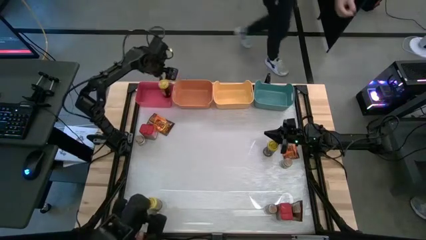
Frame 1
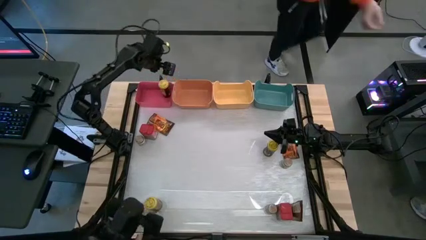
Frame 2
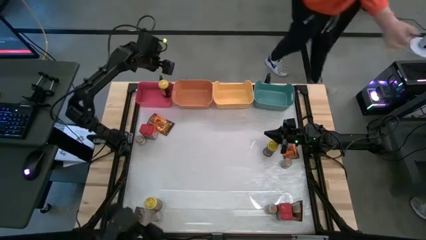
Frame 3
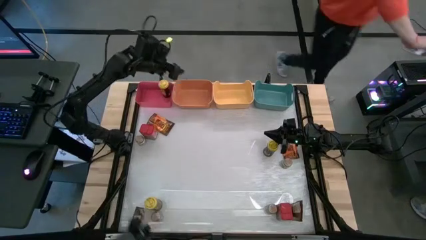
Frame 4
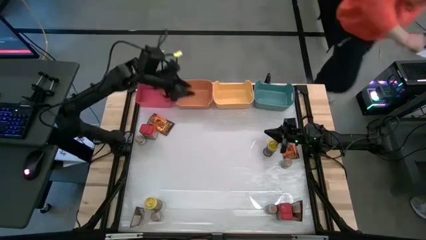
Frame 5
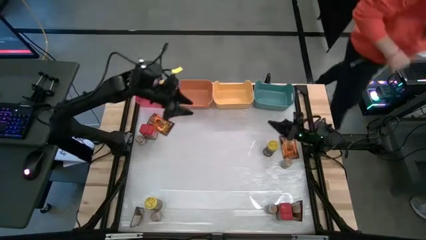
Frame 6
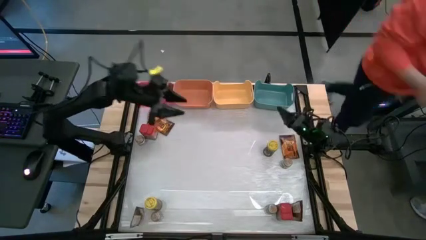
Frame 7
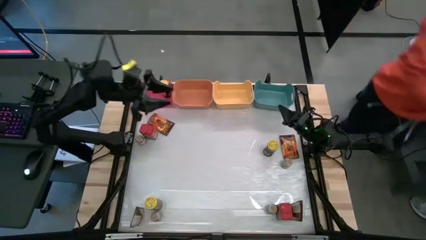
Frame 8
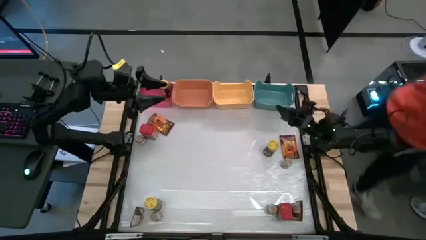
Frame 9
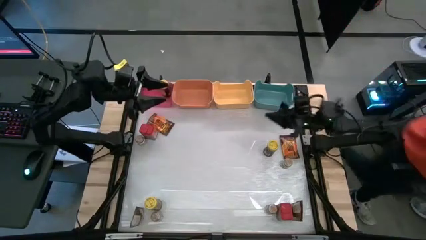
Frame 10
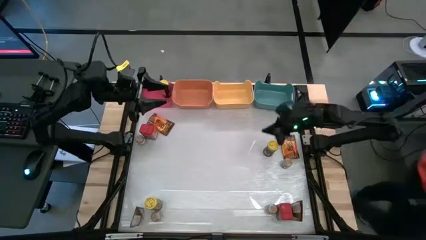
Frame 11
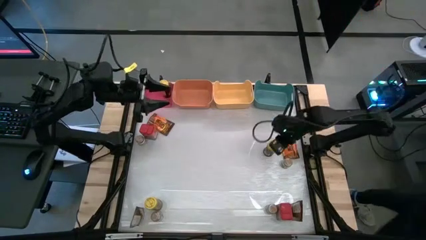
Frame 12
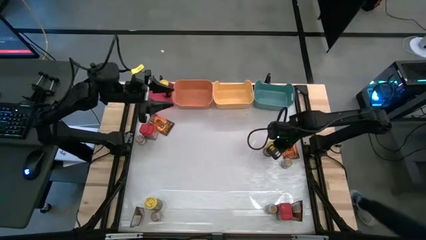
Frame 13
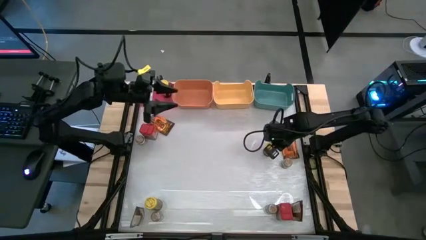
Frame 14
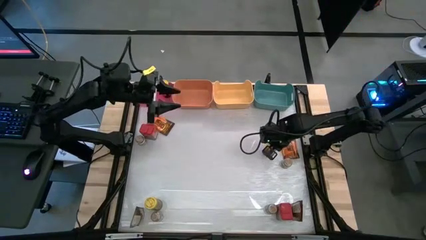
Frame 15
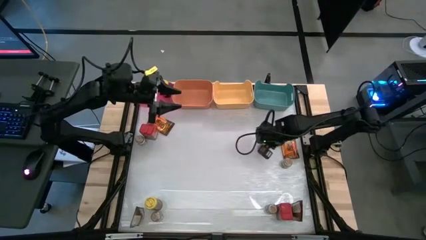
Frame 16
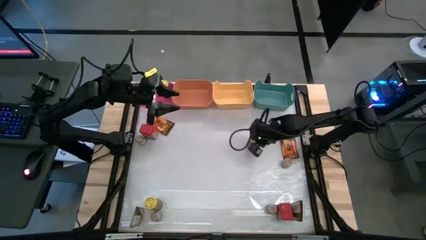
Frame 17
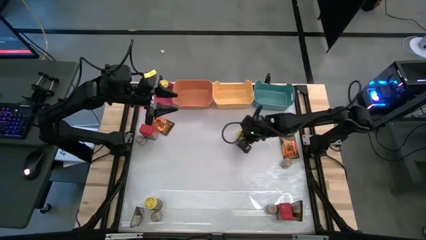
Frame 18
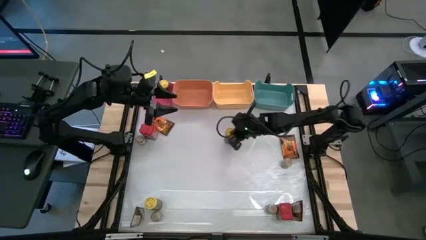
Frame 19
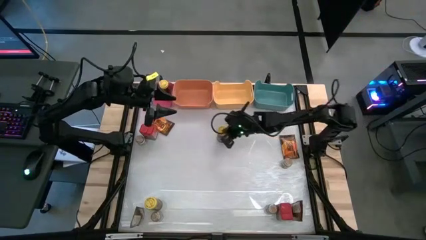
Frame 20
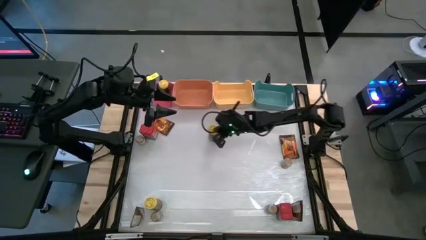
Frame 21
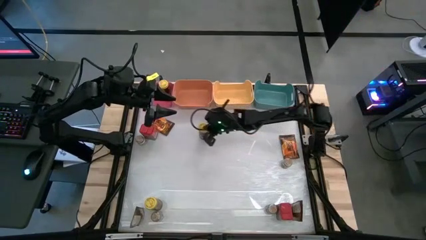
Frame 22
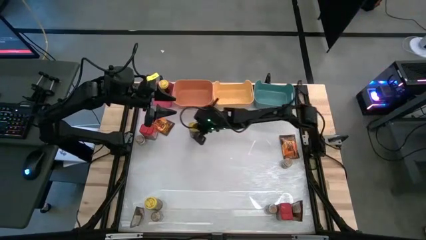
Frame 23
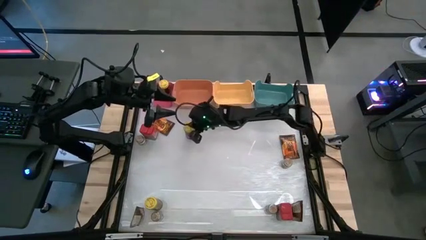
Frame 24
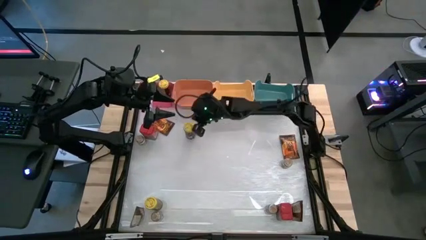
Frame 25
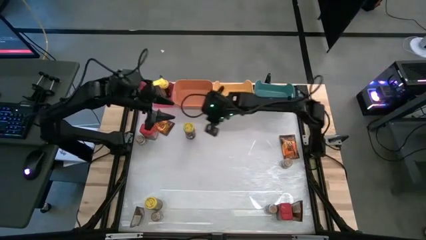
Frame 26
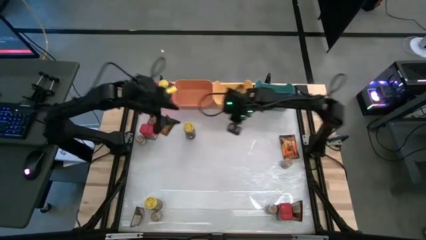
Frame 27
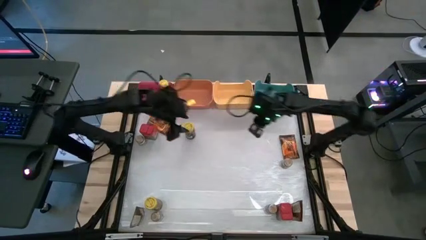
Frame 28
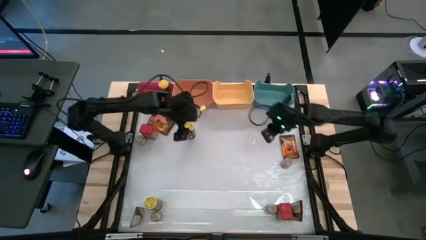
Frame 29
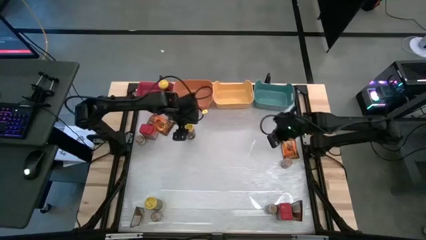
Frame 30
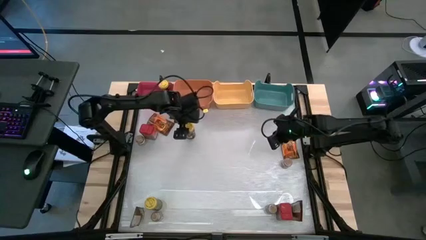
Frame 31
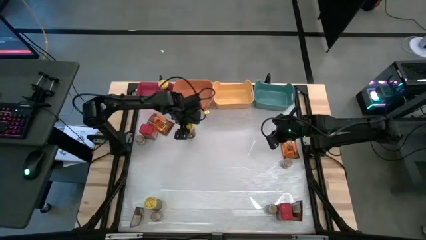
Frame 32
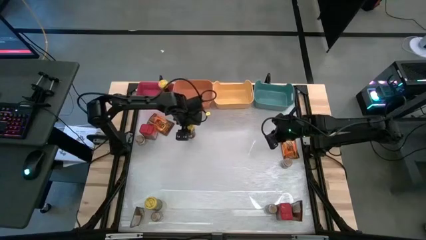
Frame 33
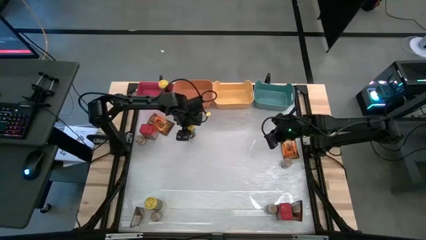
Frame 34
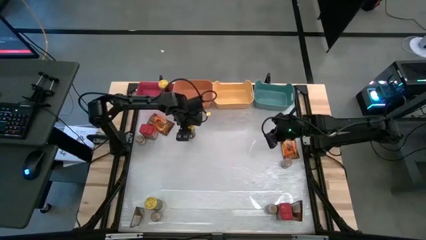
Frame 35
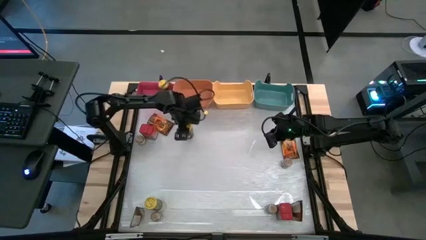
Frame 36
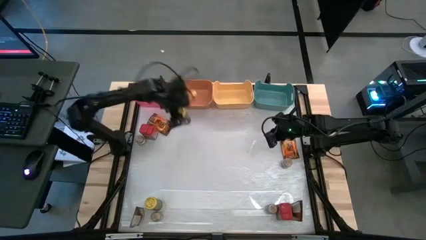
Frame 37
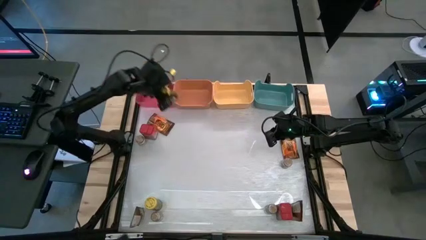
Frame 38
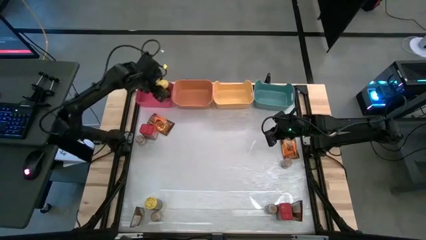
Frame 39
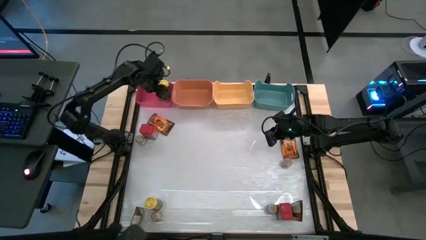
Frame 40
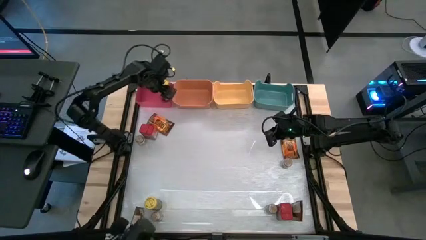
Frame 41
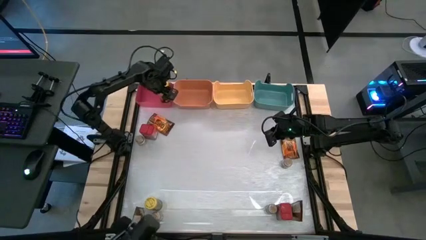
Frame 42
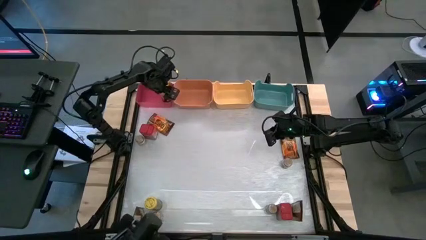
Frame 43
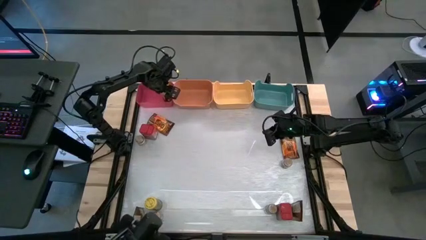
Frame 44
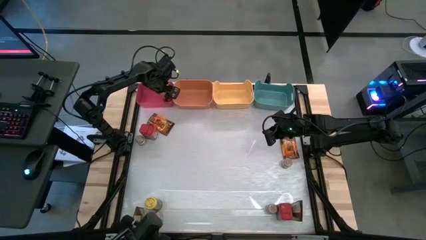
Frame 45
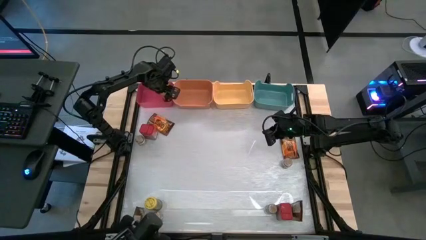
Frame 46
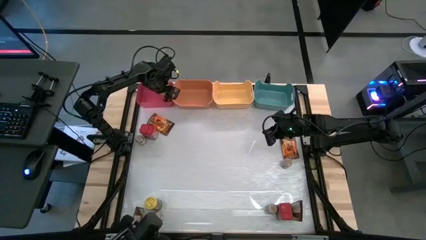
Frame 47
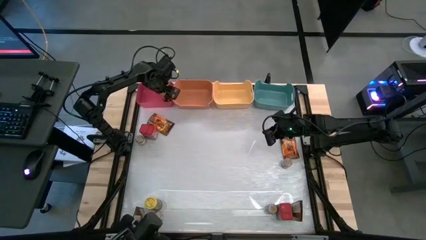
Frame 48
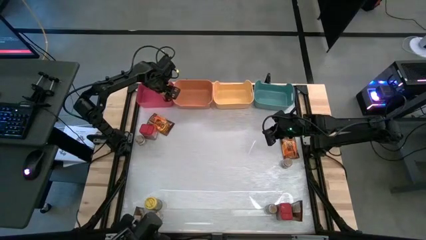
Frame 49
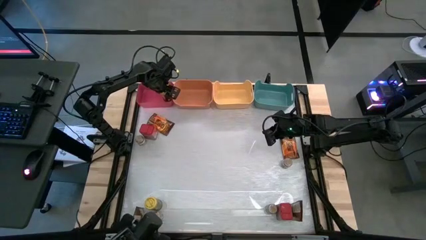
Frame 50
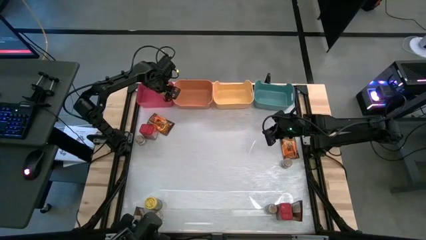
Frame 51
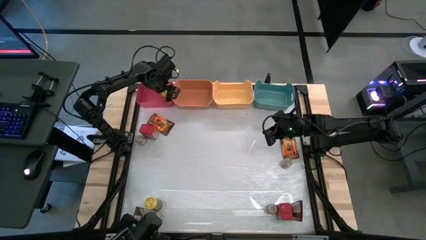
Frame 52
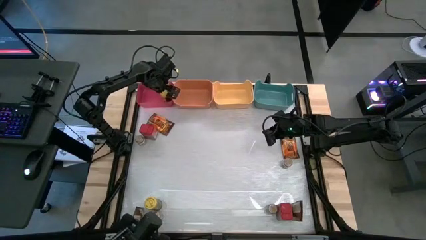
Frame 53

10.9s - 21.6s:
Task: Sort spices by type
Put the right yellow seasoning can into the pink bin
